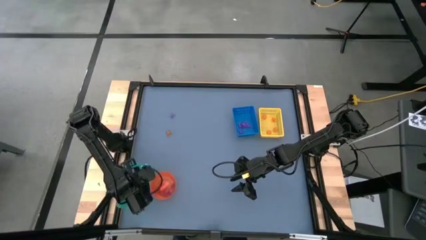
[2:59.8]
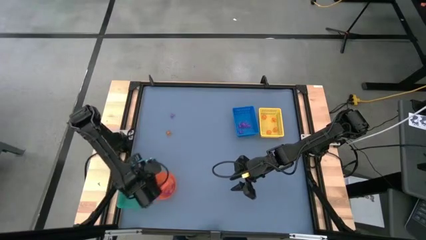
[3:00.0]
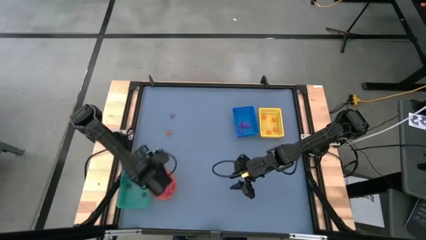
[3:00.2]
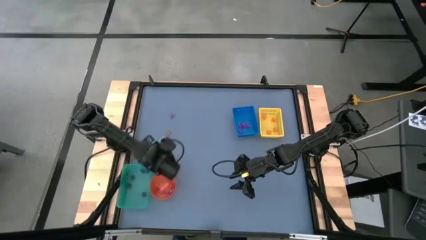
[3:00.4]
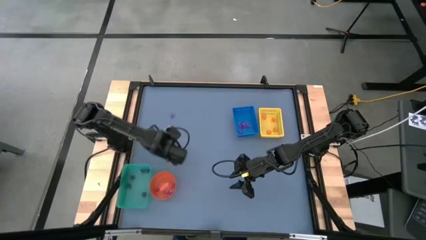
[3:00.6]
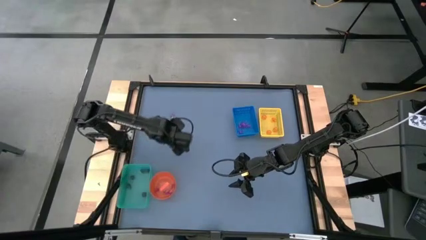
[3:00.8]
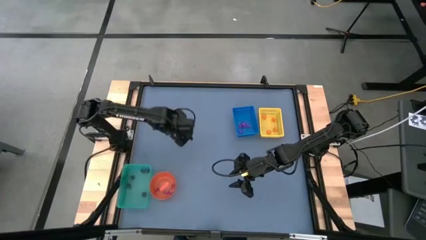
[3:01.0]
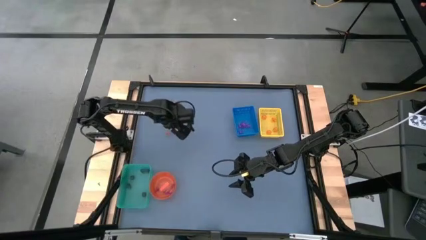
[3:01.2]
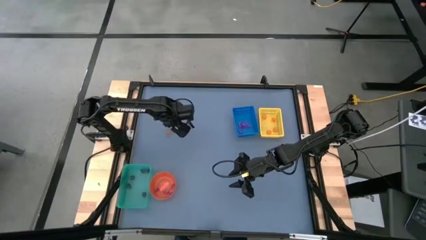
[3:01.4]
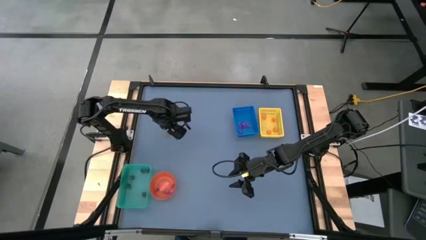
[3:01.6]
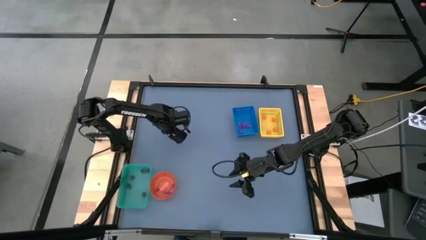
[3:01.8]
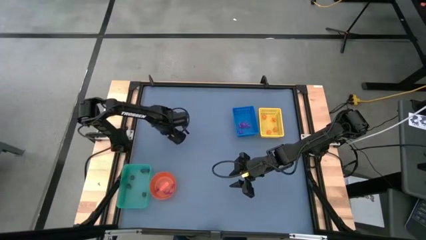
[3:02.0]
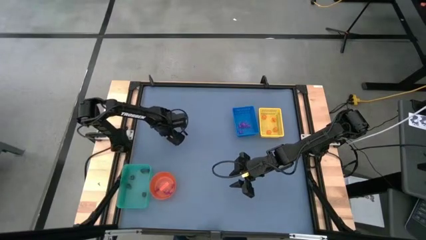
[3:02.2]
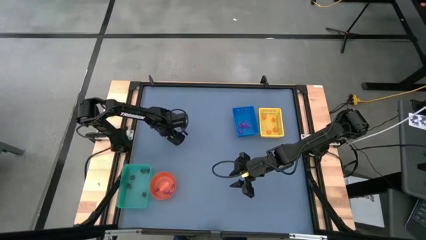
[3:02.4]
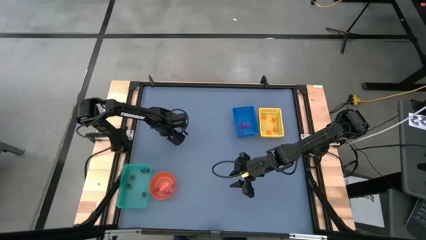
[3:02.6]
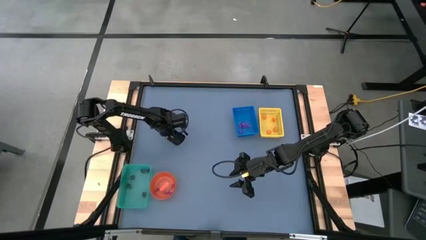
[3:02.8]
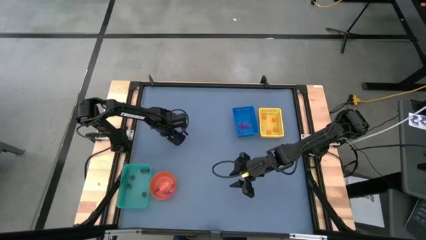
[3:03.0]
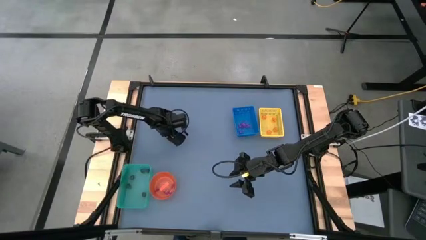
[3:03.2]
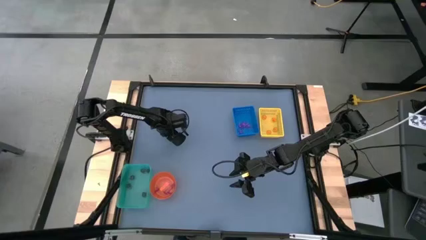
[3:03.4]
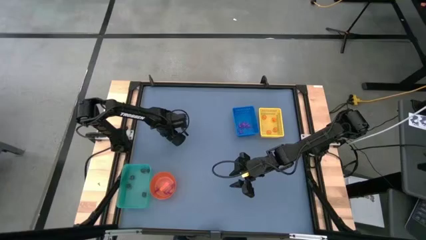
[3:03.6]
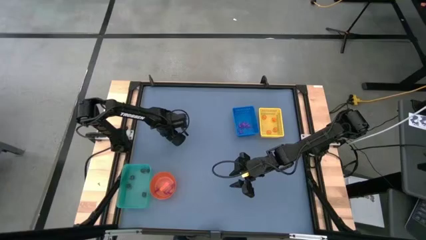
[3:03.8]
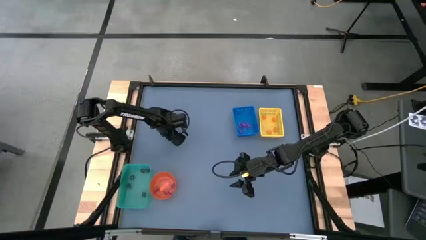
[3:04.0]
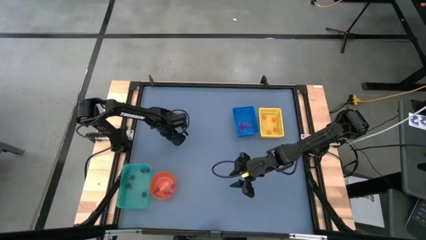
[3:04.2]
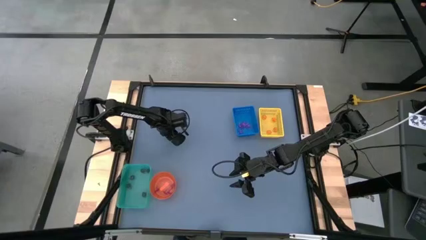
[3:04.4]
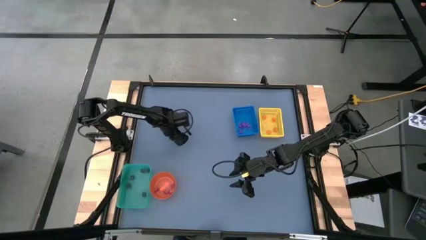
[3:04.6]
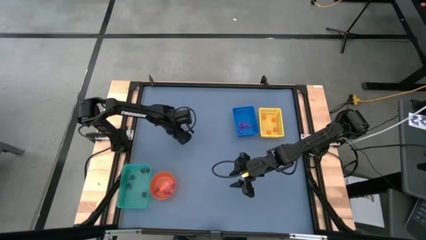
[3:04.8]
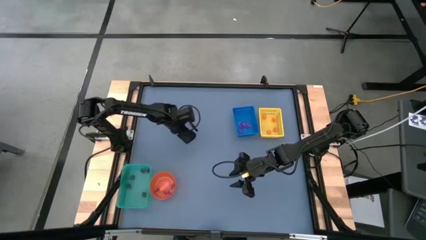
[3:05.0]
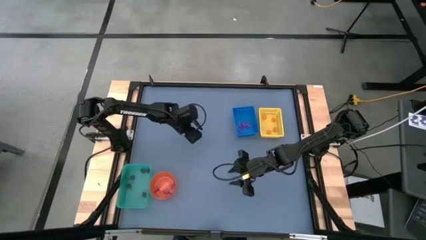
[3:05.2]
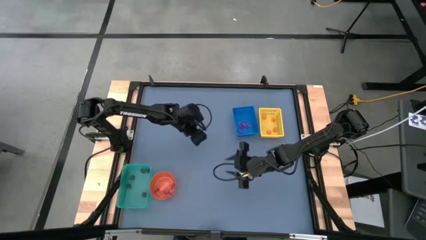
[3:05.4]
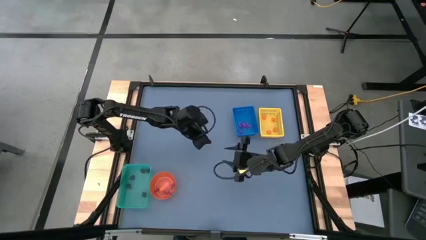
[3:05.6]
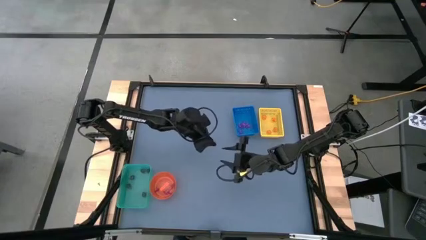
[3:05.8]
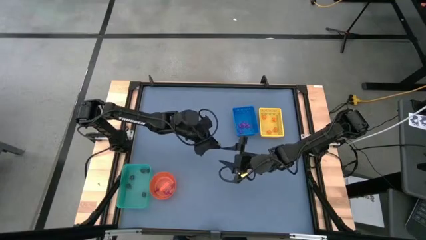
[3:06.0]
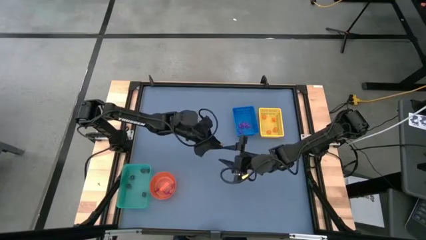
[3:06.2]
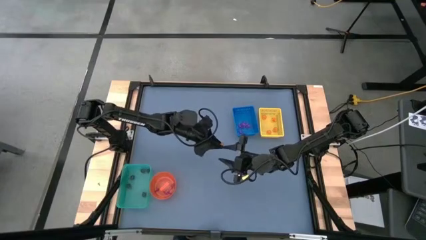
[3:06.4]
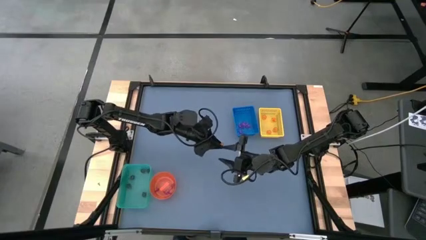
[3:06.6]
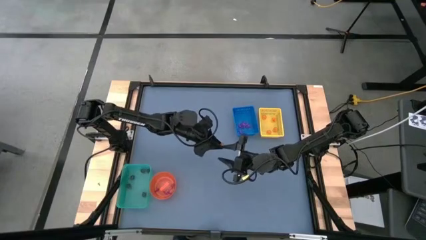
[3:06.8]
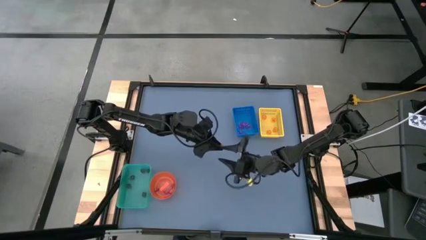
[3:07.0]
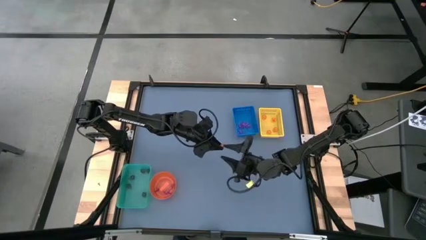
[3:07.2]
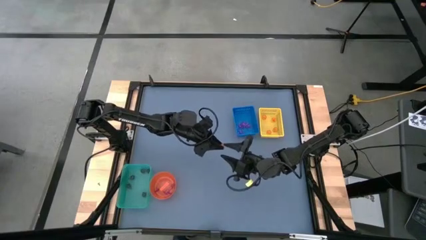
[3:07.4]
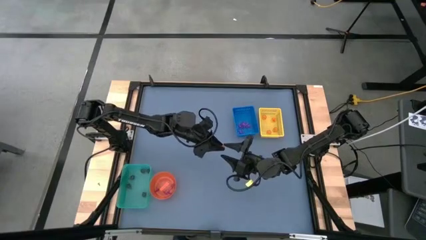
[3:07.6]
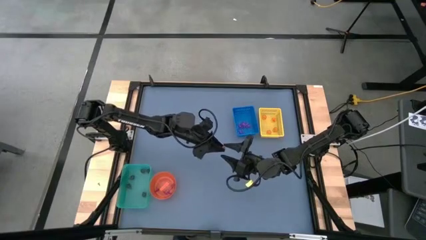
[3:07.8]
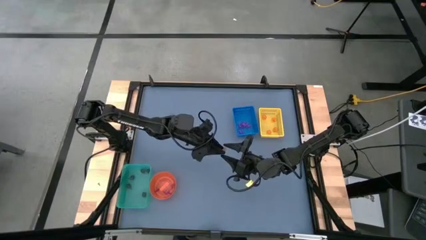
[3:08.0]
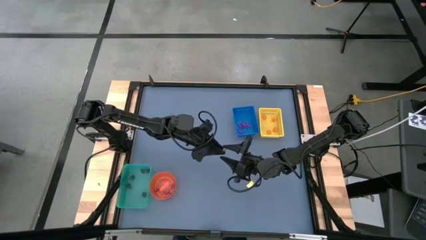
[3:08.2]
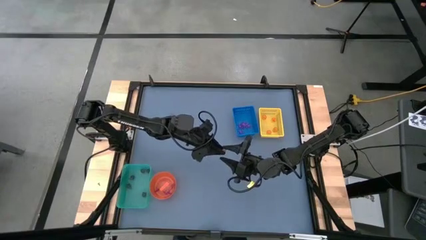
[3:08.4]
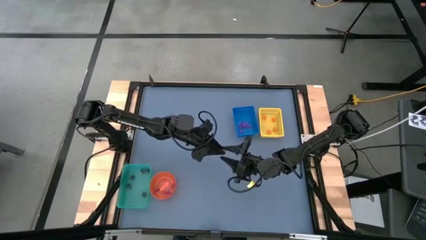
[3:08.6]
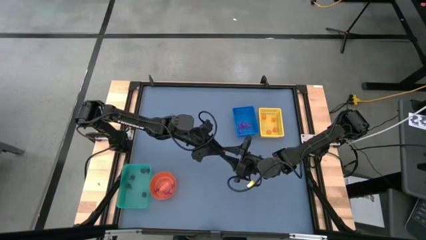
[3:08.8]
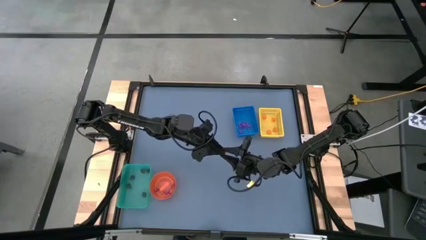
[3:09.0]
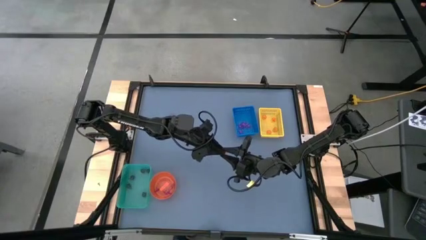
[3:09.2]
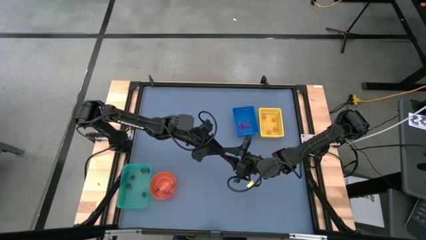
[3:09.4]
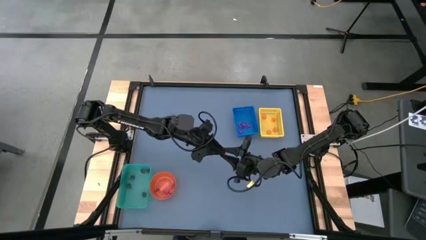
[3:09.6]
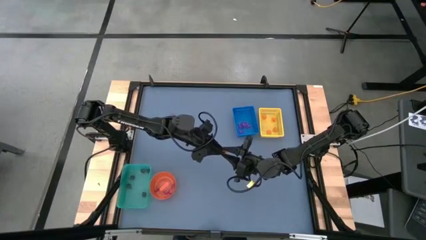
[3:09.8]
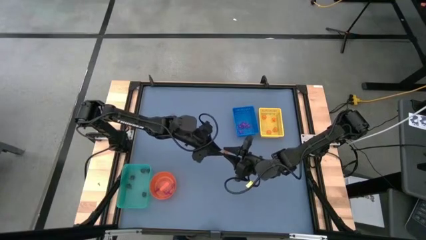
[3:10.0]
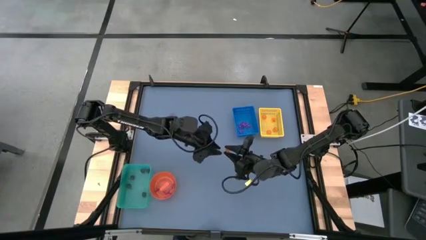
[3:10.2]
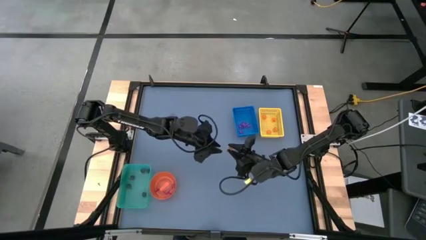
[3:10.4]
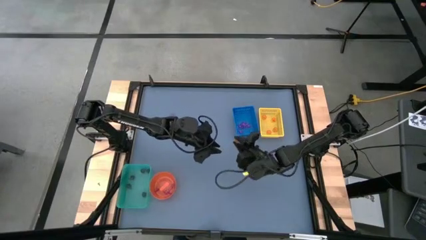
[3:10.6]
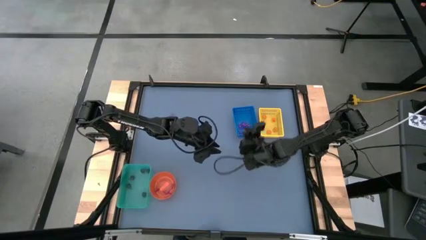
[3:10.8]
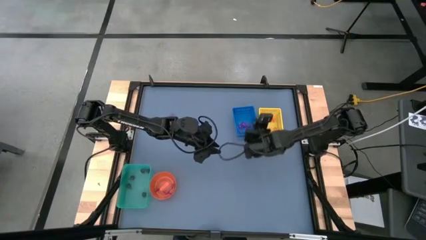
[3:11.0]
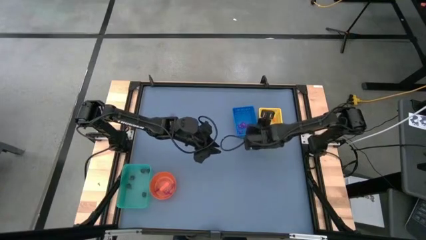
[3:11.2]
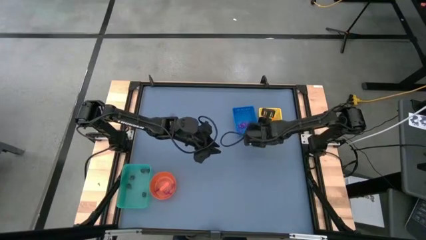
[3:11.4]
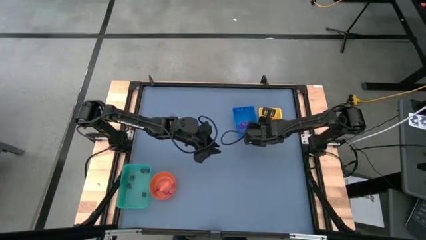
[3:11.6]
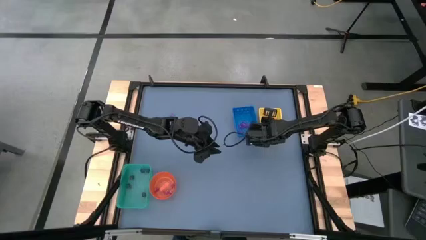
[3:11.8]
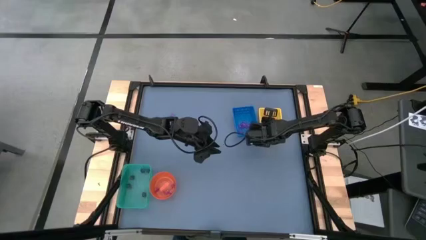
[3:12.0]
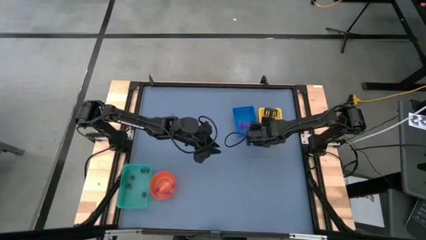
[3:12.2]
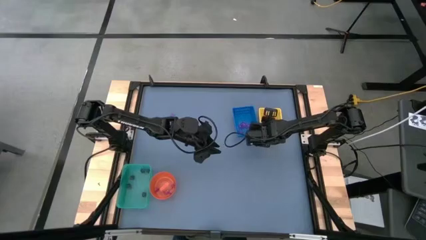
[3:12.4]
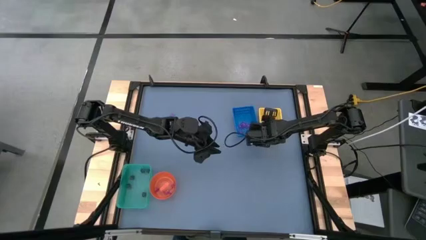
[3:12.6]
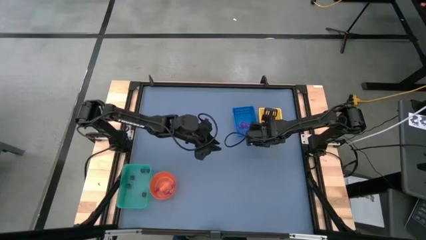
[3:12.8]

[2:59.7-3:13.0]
Task: Sort Halloween decoration
Put the orange pumpkin toy into the yellow box

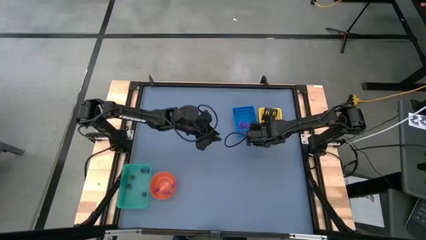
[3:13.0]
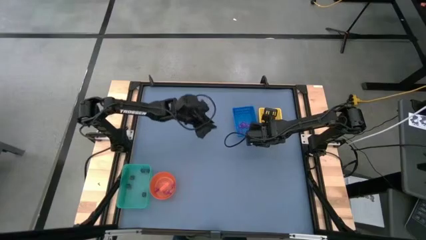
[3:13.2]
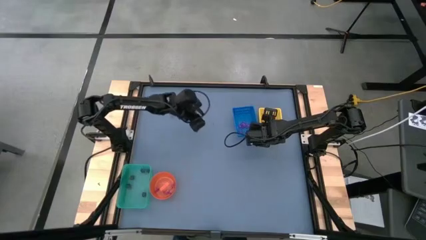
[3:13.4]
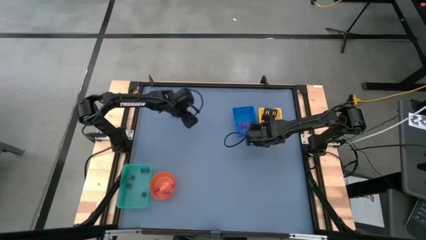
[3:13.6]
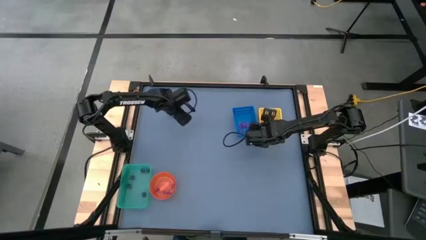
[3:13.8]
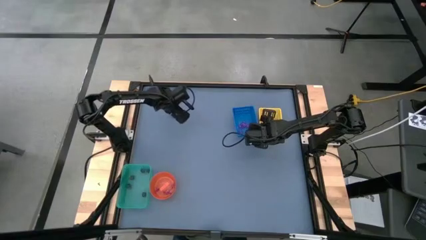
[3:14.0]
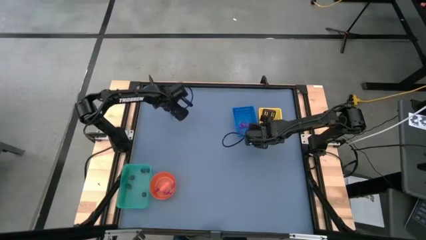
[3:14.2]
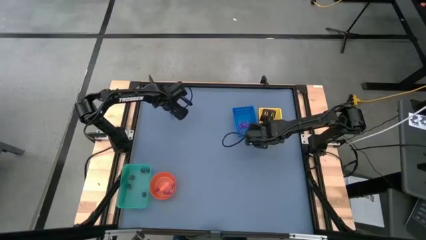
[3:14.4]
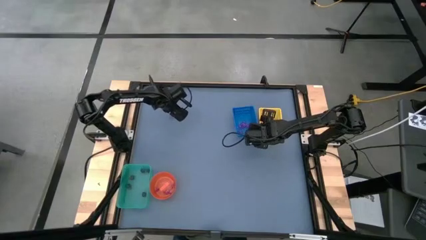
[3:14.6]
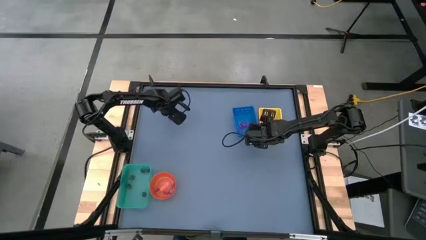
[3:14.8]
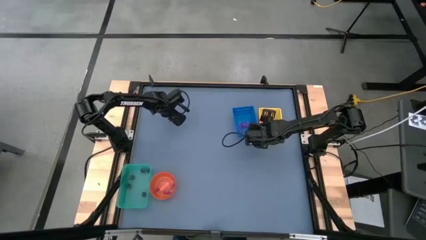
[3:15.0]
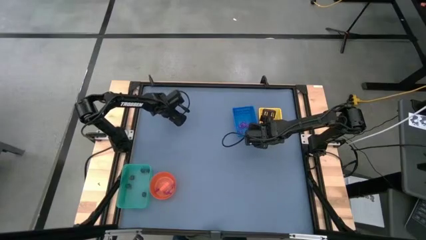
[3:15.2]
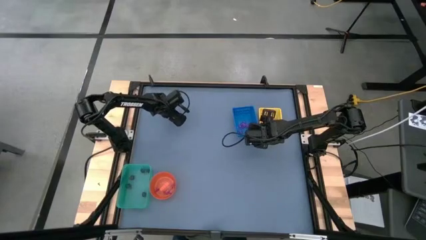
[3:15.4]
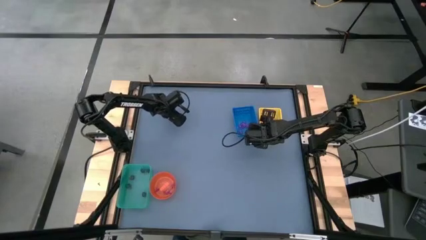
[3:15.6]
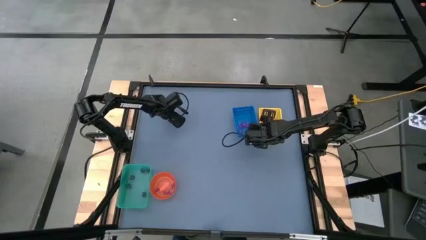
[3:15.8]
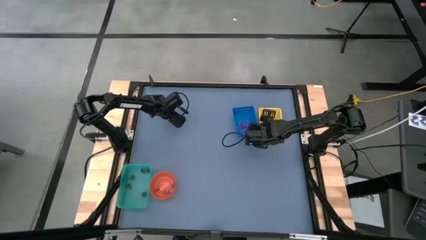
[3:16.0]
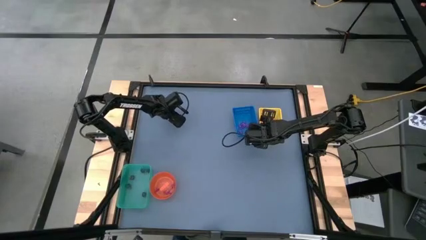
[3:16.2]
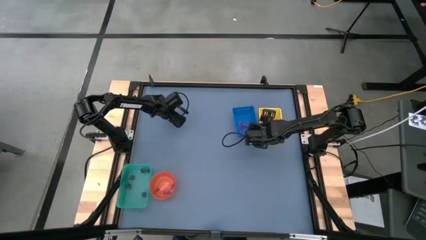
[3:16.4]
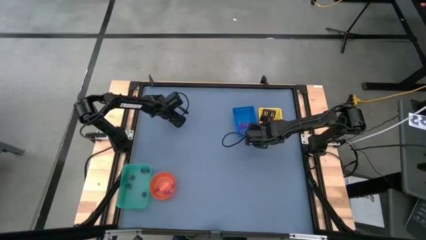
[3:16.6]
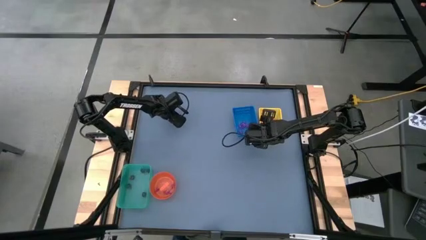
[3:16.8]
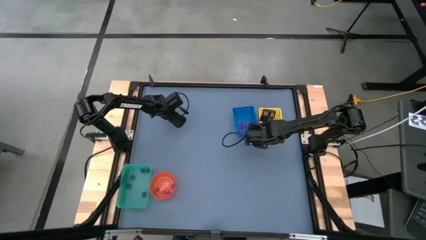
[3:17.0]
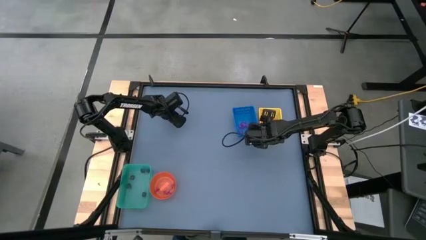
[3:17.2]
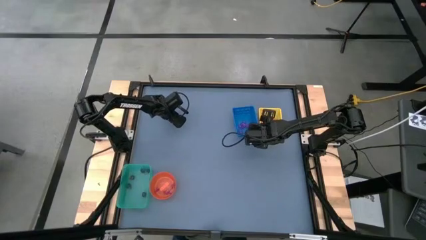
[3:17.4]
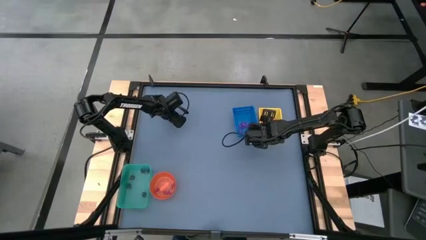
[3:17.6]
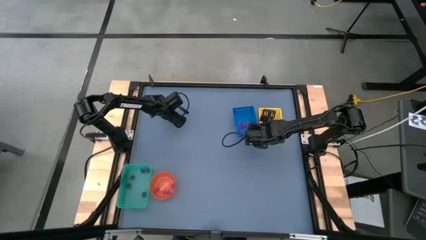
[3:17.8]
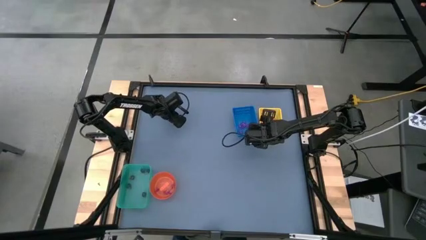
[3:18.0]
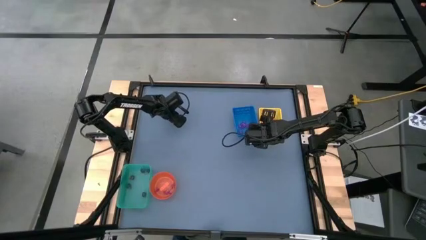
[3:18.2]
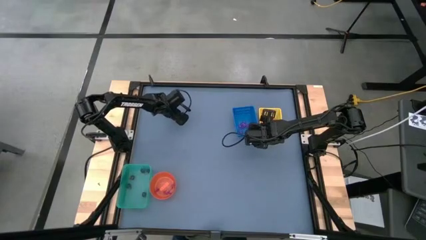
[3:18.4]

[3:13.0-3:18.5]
Put the violet spider toy into the blue box
